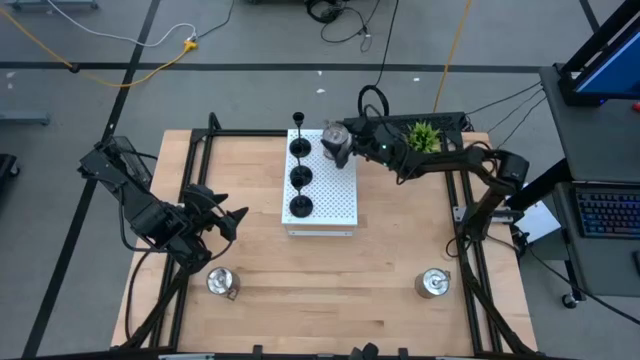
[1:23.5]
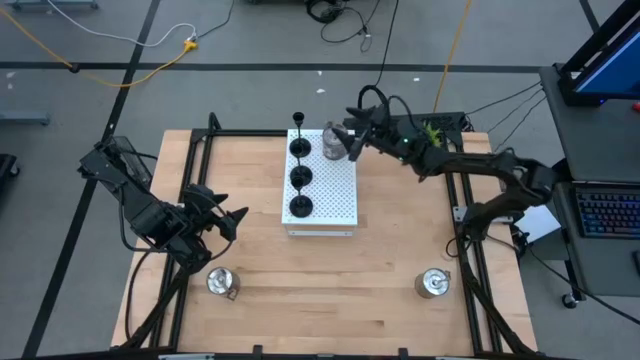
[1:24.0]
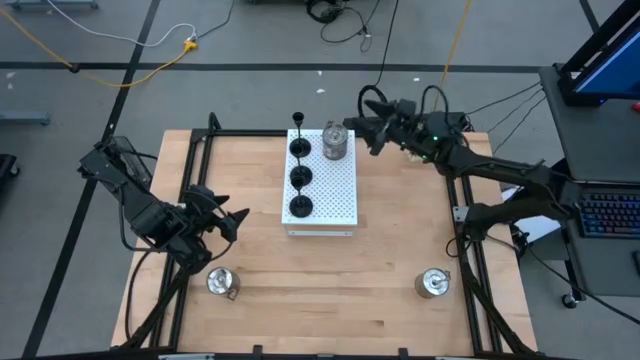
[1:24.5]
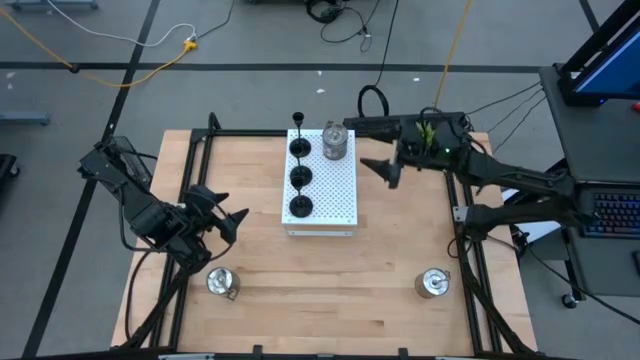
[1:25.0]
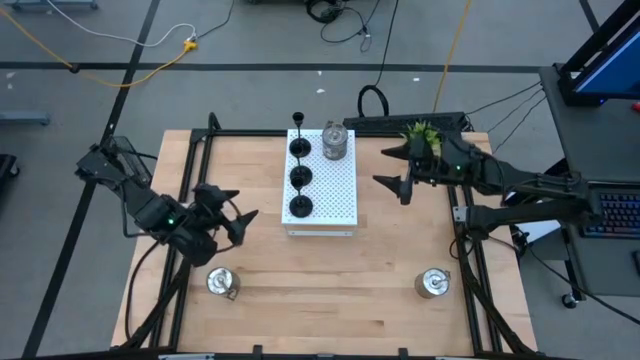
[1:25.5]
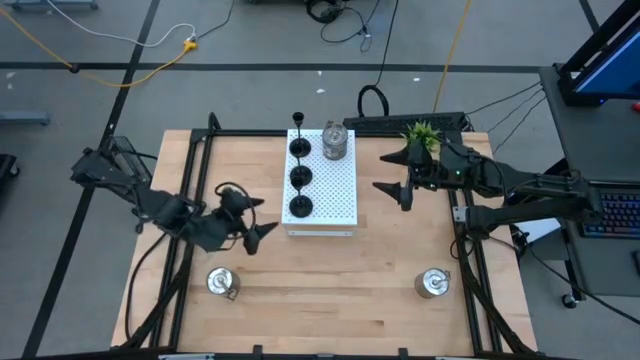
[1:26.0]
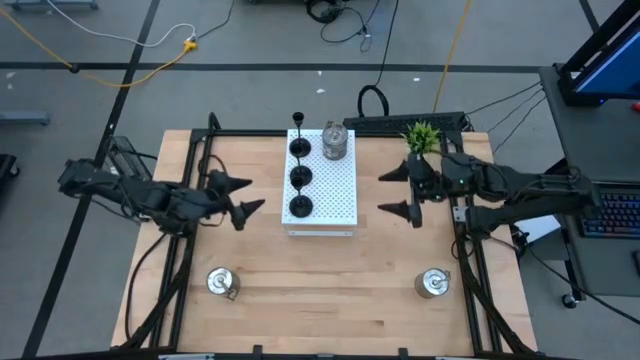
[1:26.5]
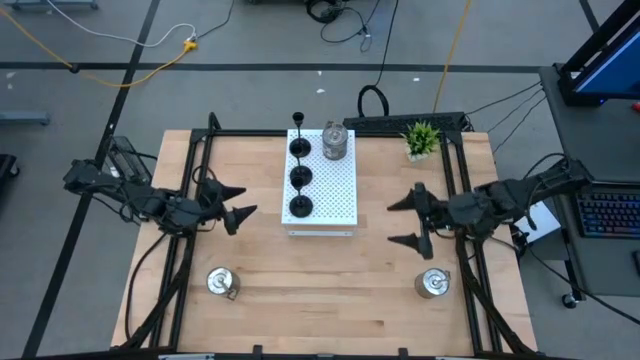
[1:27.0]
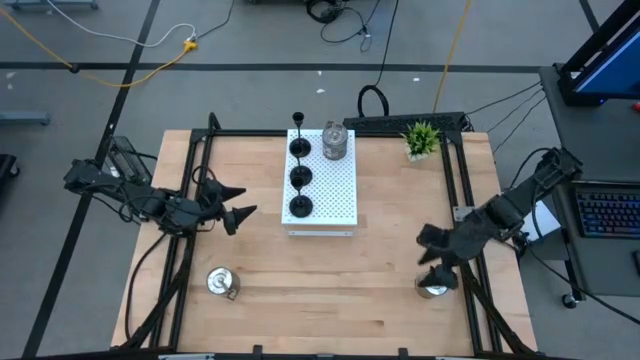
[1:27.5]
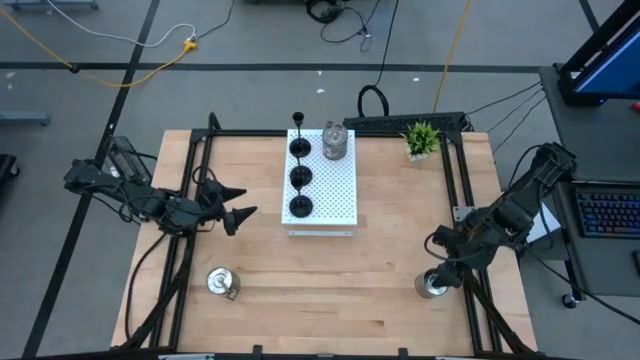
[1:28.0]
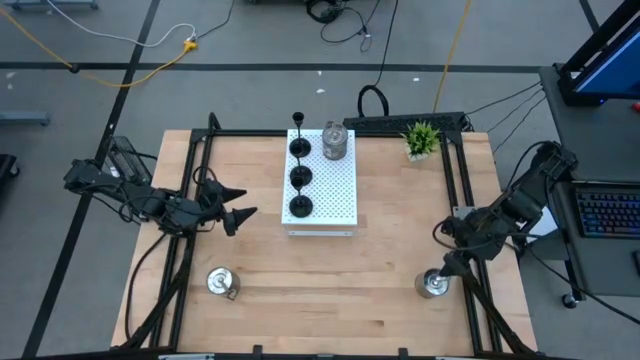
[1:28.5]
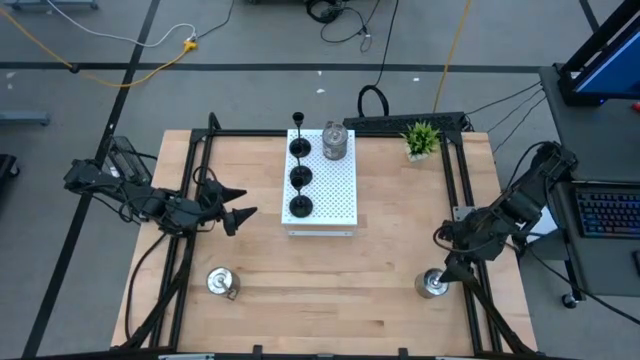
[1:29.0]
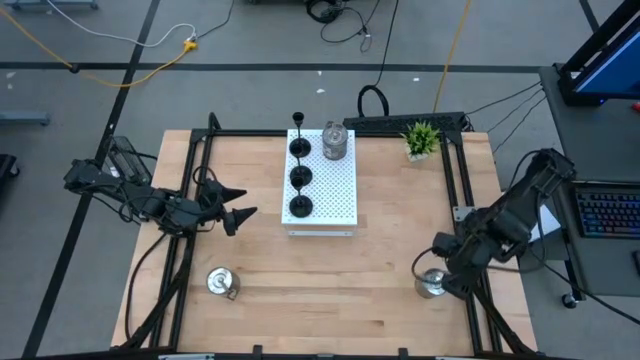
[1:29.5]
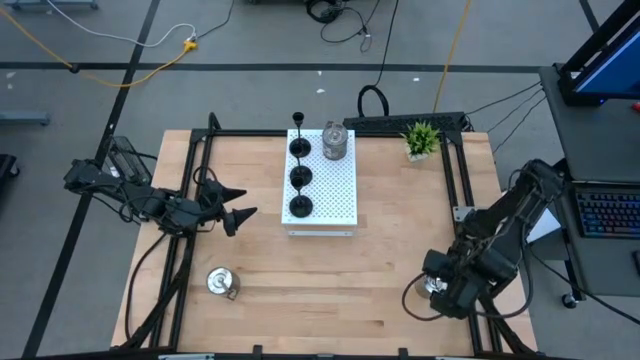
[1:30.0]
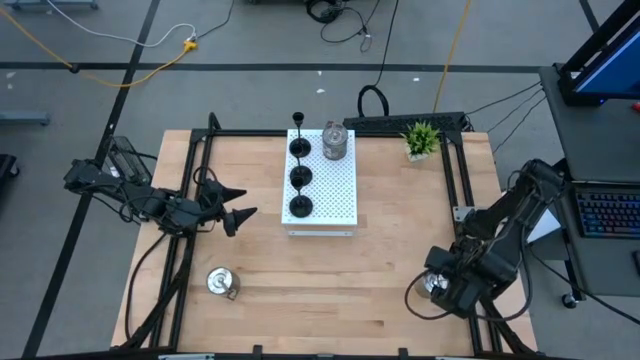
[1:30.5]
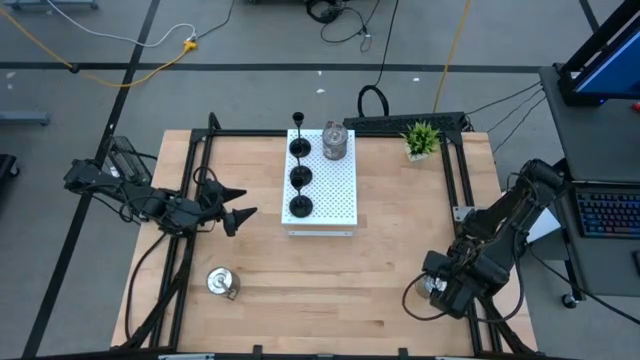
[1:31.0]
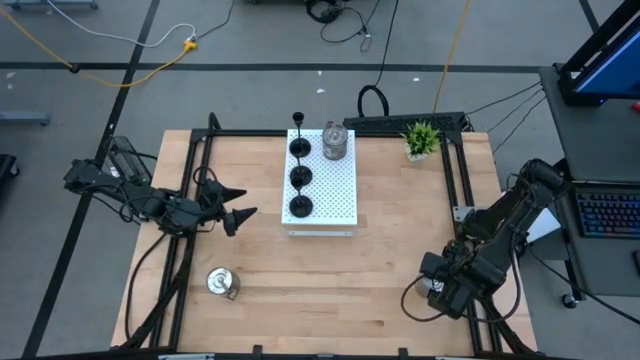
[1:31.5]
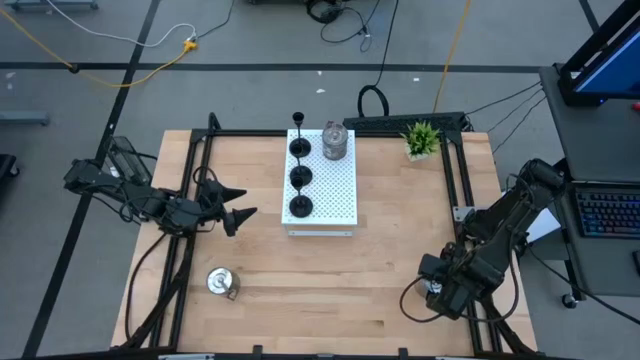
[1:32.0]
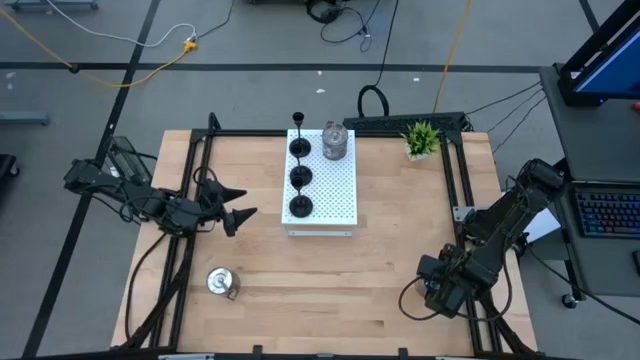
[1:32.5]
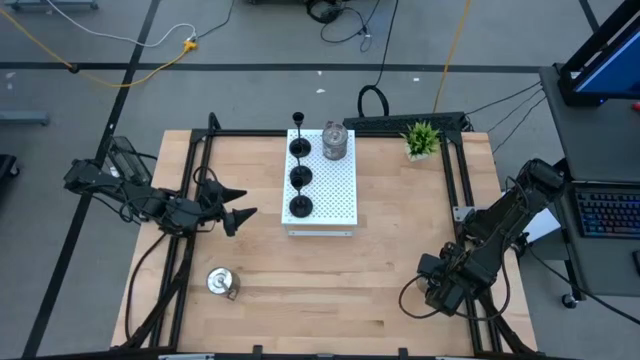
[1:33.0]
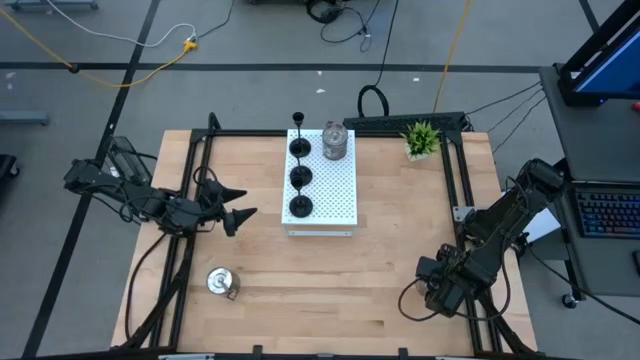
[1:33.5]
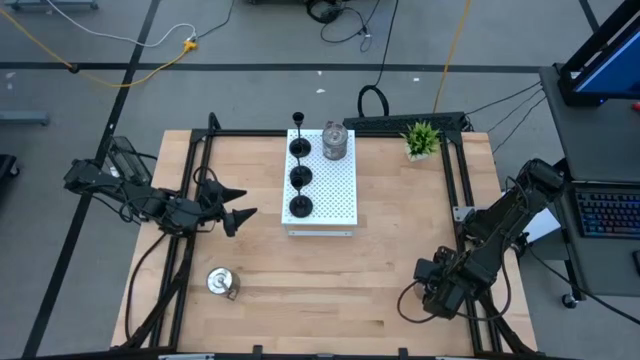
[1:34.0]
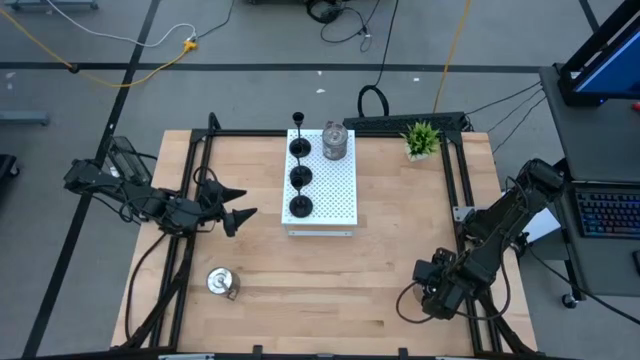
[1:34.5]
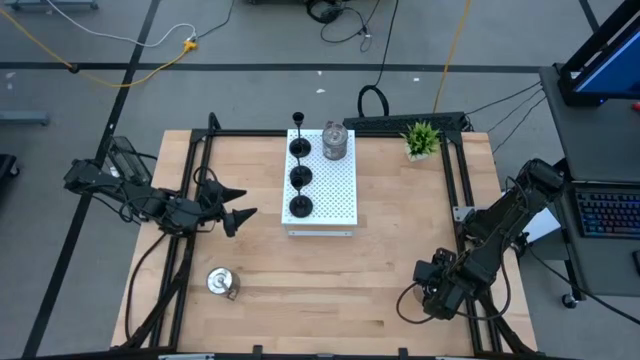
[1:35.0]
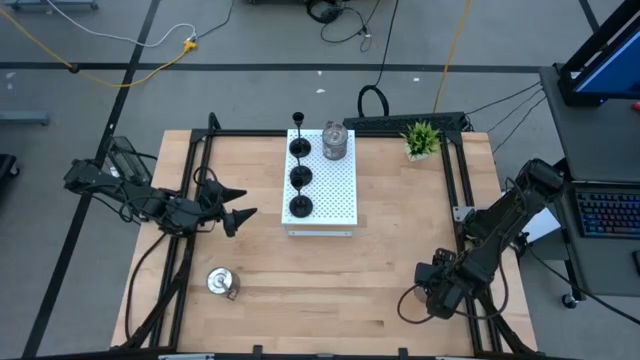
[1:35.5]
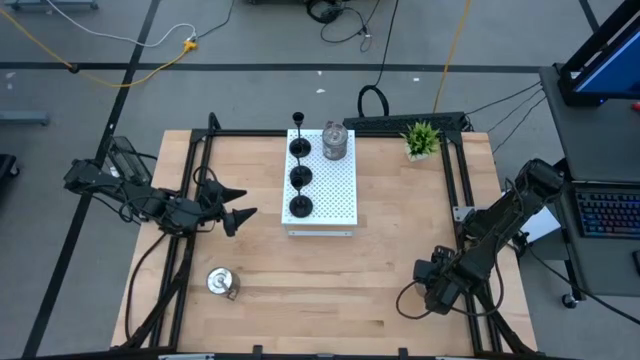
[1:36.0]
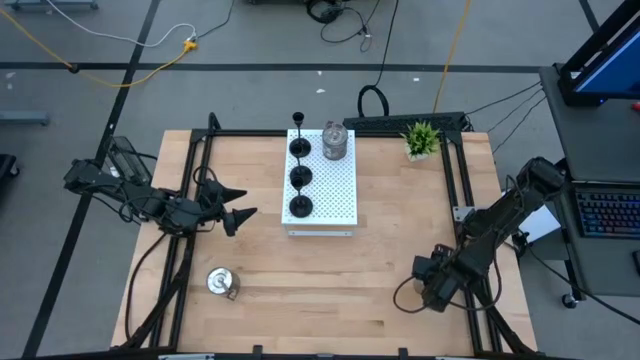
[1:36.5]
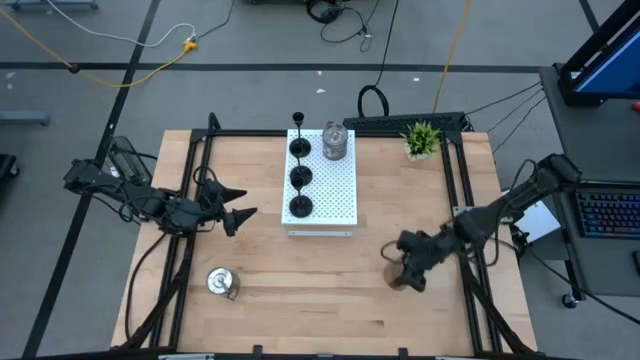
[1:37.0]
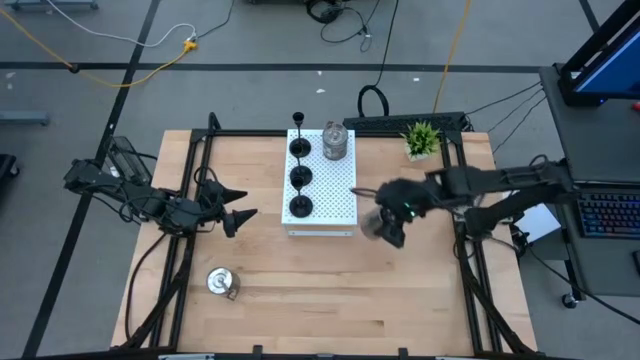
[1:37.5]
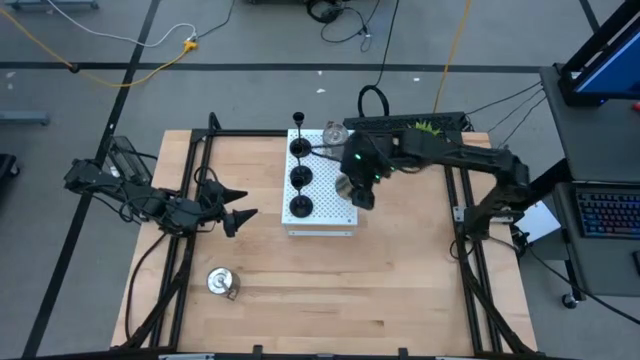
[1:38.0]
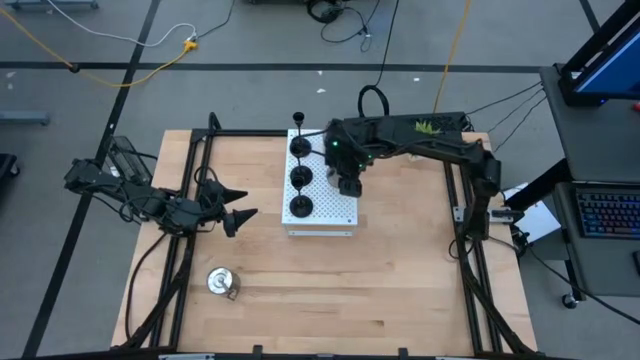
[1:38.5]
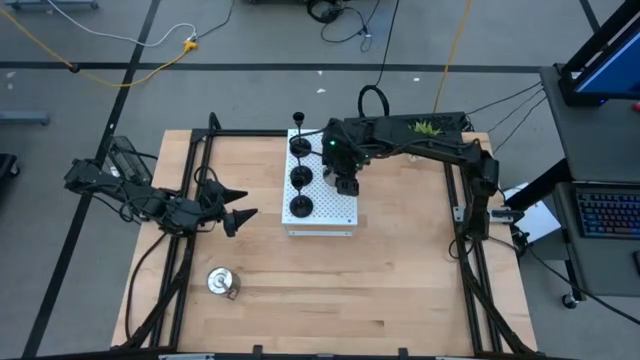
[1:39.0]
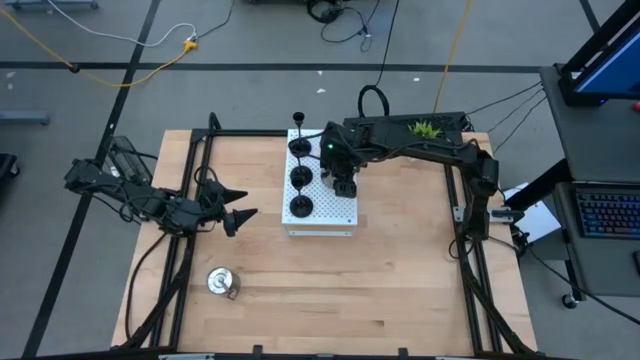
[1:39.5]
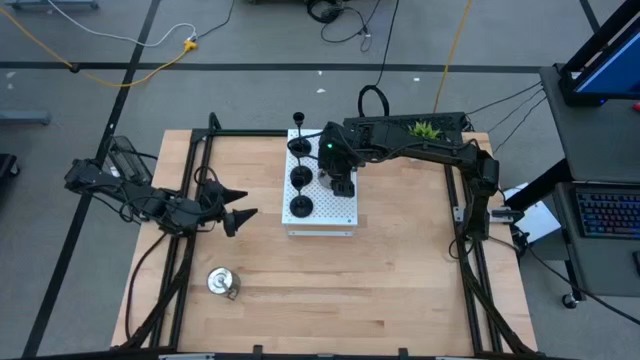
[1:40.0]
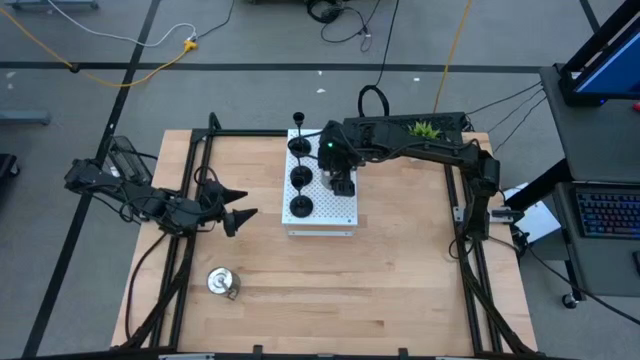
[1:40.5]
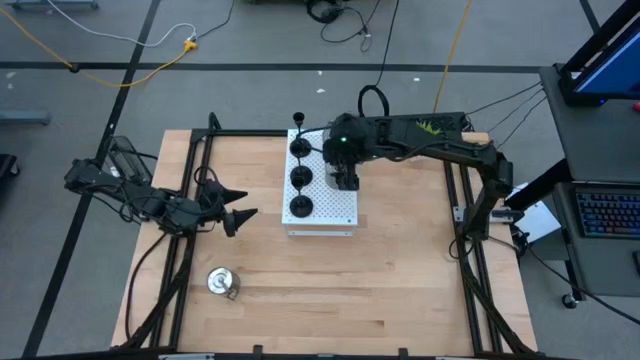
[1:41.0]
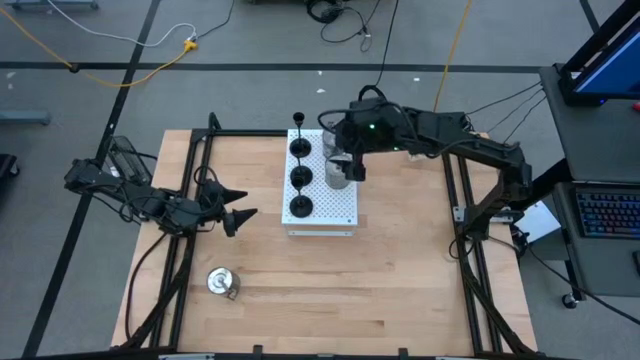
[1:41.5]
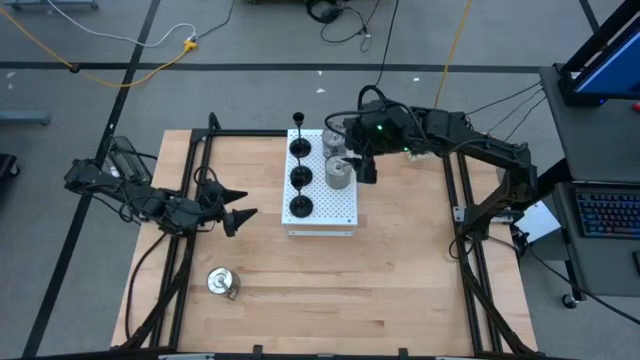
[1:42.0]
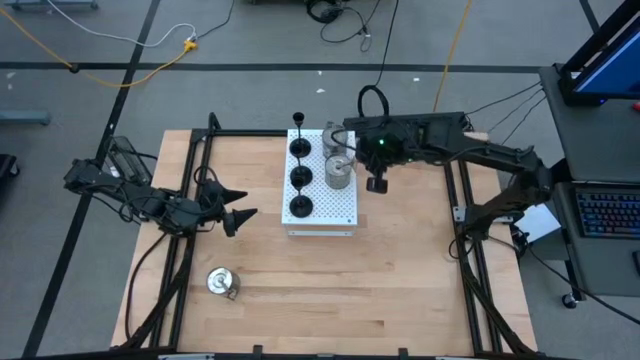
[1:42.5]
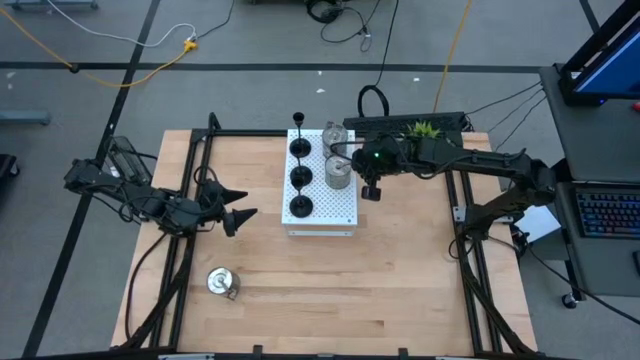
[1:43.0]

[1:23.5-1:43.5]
Task: Pick & Place candle stick holders
Put the right silver scented candle on the shelf aligned with the other silver scented candle

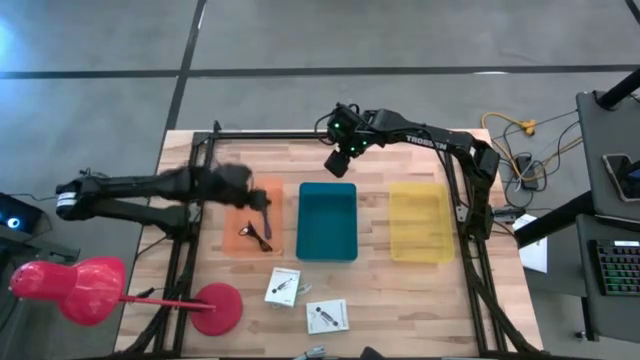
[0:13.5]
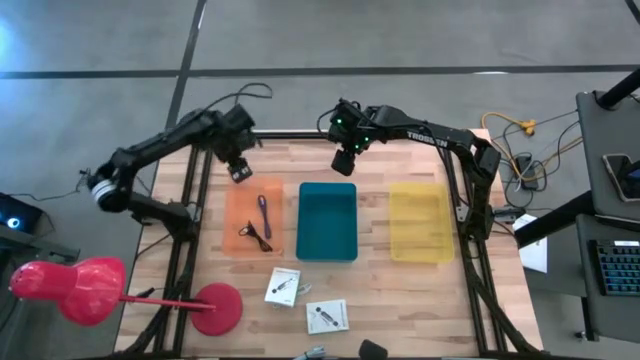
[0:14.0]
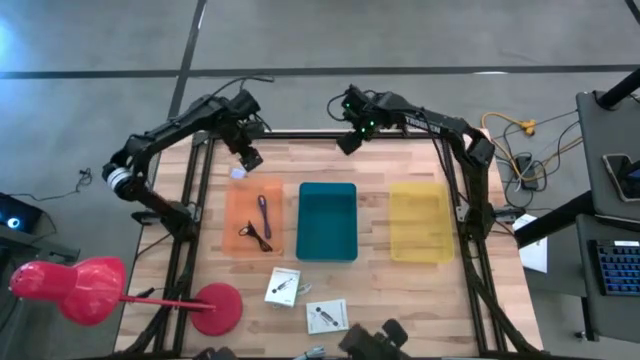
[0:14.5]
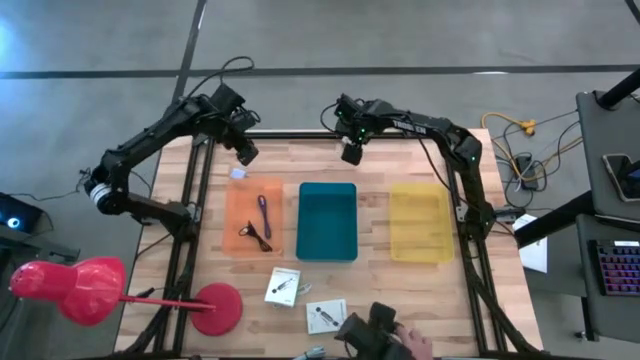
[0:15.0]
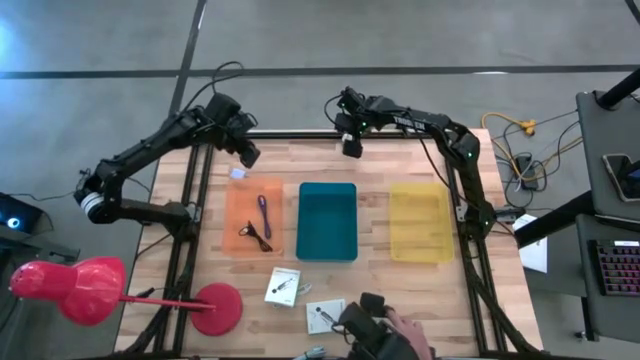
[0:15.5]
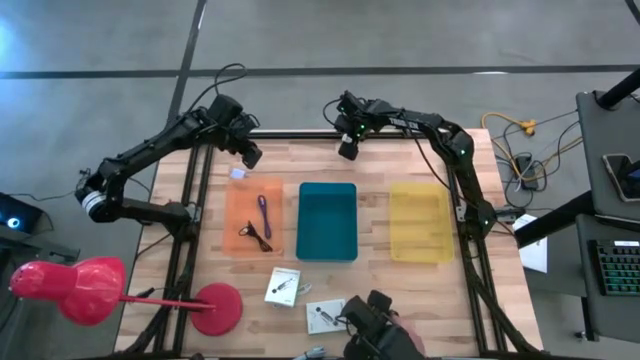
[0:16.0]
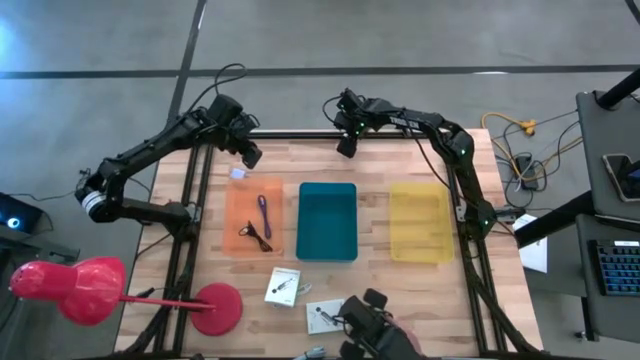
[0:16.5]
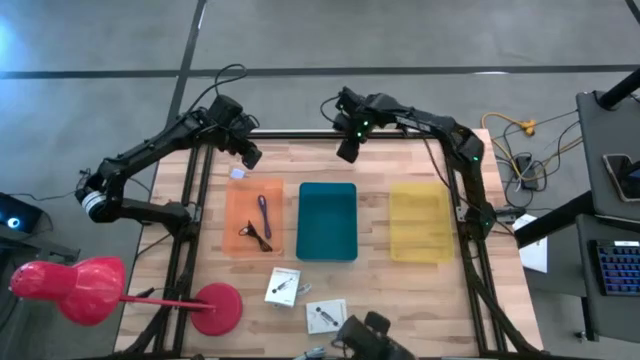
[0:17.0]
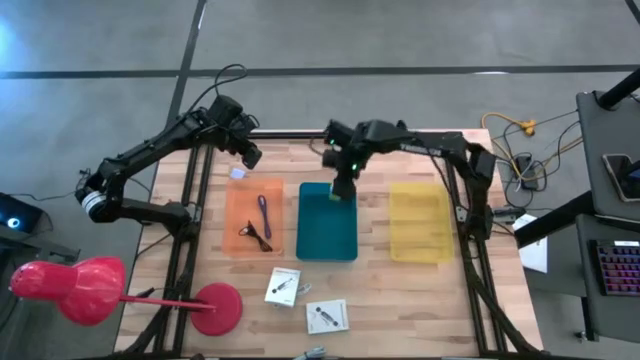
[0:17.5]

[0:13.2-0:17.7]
Task: Pick and place items into bin
Put the green adapter charger into the blue bin
